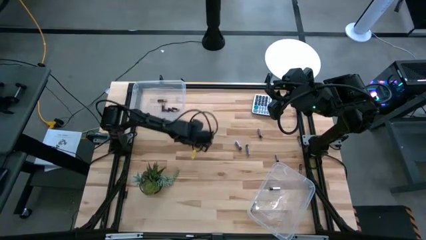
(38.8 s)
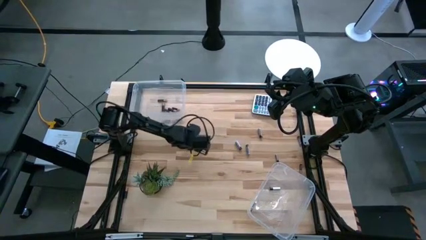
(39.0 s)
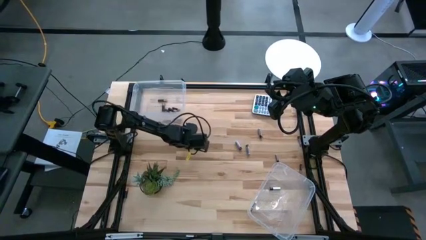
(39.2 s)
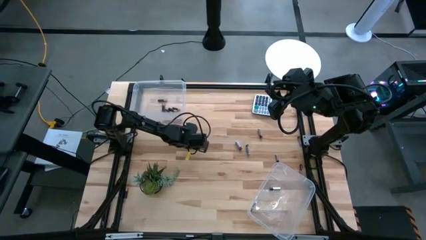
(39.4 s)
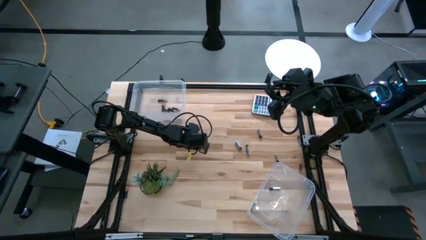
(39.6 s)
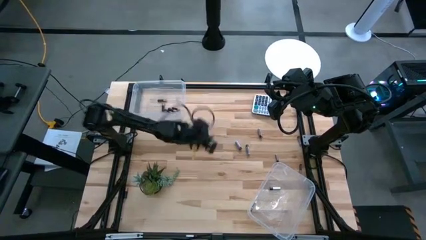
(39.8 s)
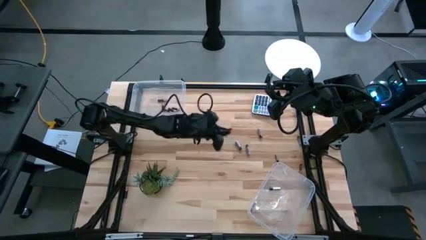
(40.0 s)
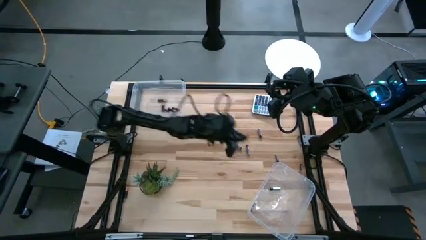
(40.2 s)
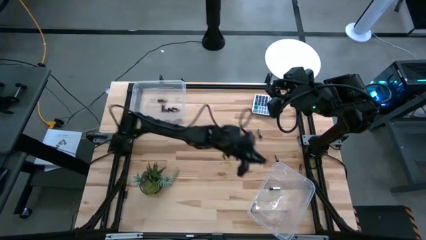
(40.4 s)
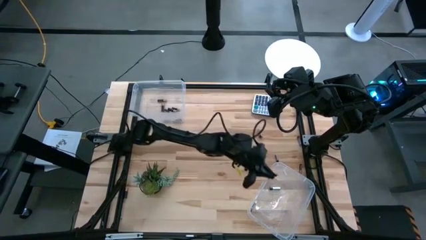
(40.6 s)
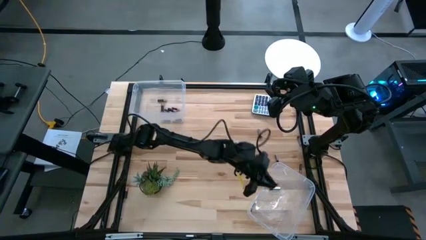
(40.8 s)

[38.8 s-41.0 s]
Task: Sort batteries
Put the silver battery into the bottom transparent bin

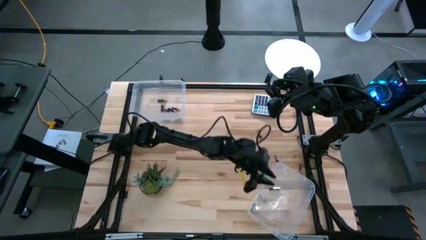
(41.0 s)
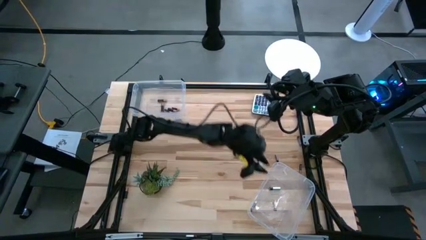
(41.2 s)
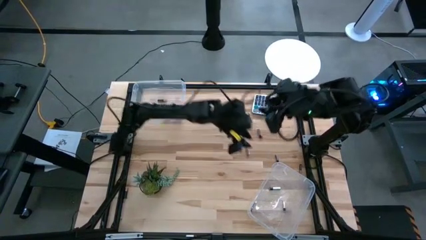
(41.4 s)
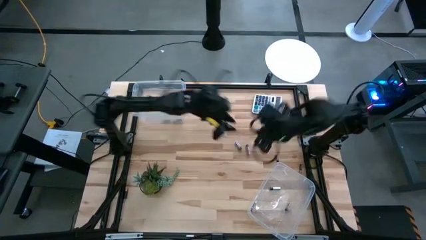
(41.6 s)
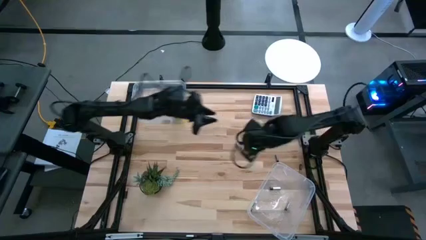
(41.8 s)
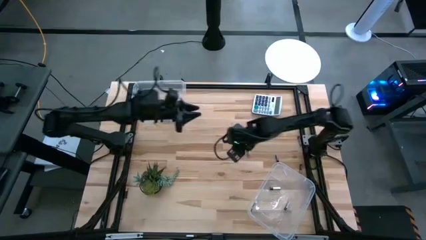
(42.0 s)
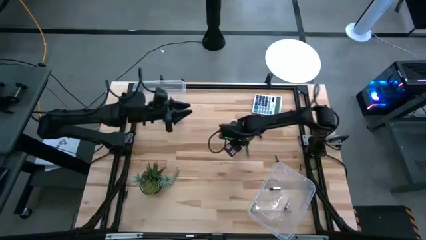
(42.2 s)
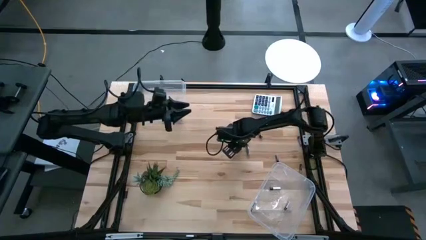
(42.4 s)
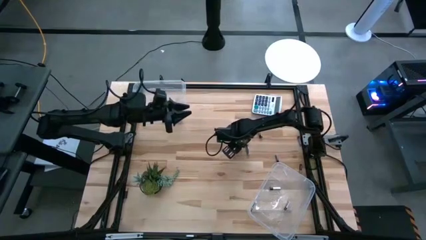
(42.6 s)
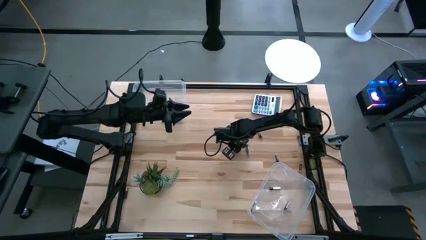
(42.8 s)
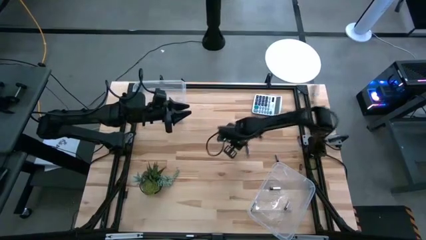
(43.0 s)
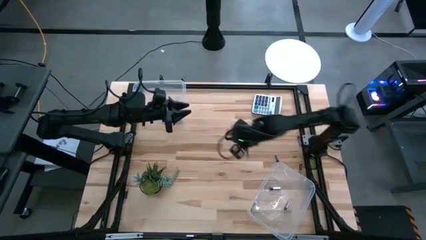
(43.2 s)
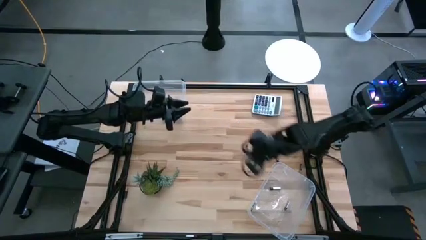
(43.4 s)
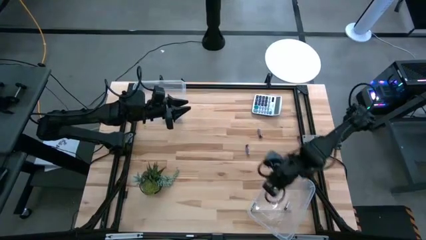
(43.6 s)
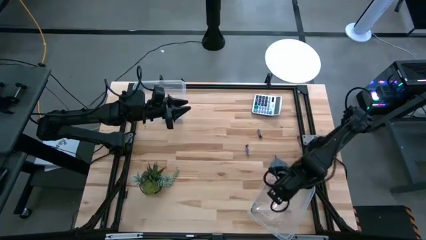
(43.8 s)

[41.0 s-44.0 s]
Put the silver battery into the bottom transparent bin

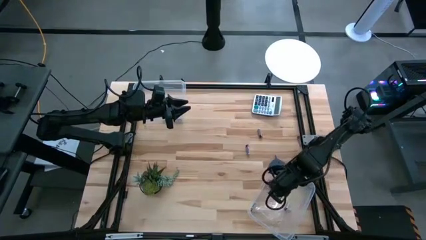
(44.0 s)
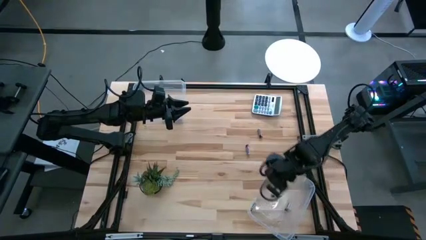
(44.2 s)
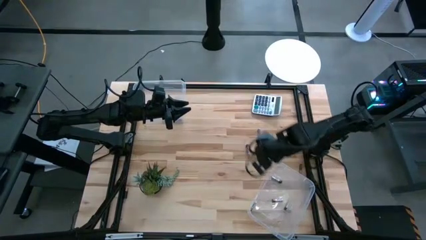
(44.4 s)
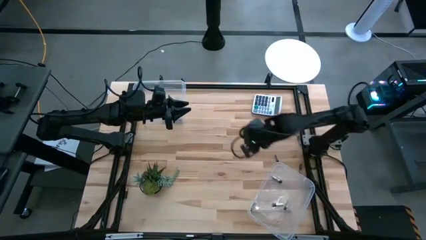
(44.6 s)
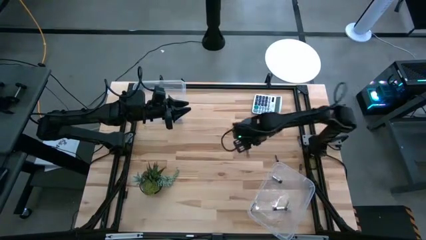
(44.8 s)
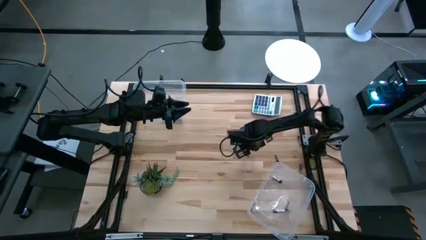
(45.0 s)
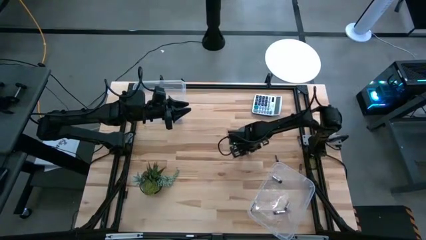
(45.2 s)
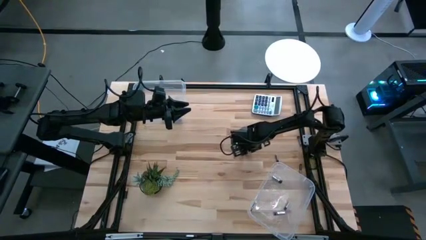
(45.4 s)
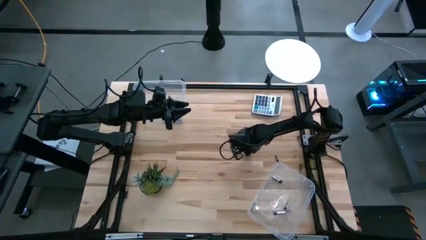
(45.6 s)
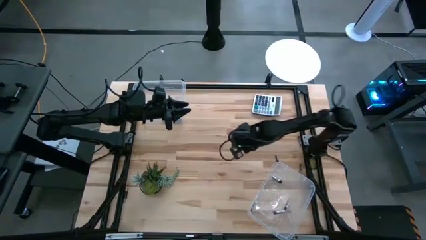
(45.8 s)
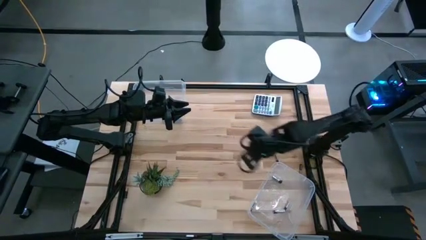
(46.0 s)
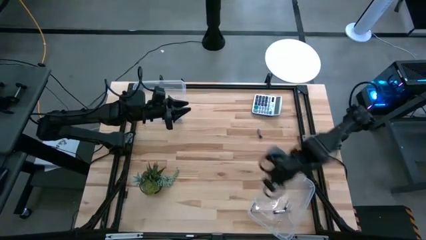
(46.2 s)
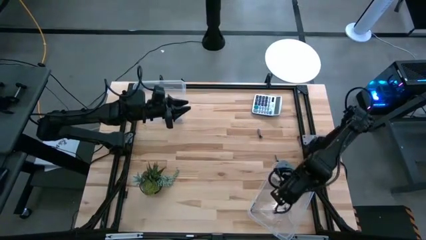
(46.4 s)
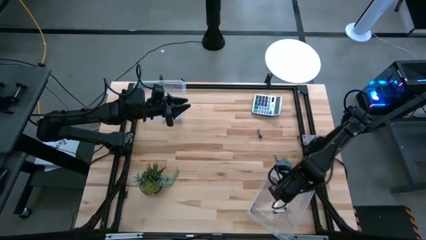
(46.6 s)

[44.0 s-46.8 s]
Put the silver battery into the bottom transparent bin

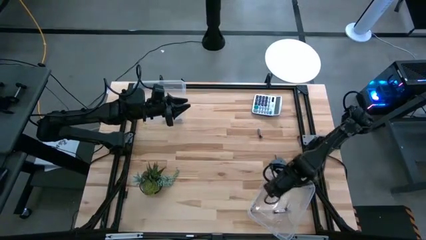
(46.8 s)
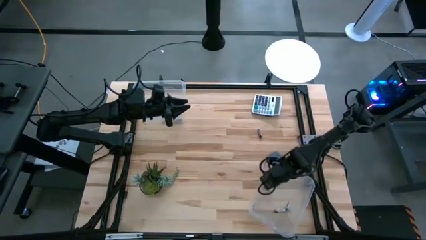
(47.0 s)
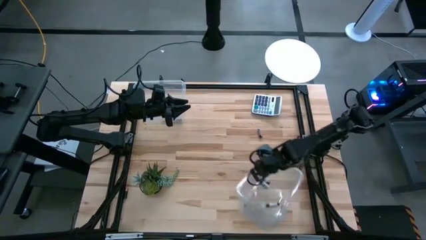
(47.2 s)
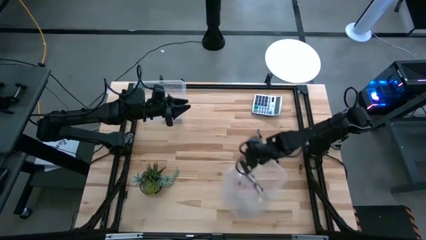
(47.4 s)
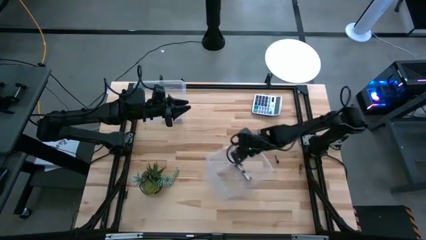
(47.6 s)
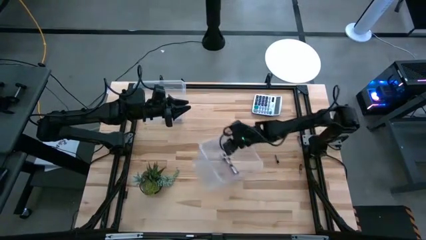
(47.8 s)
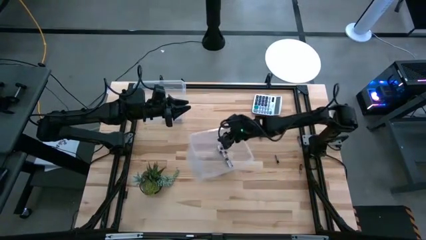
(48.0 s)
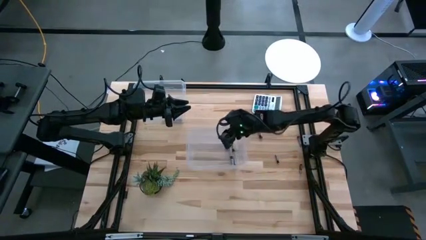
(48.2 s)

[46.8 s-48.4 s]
Move the bottom transparent bin to the center of the table

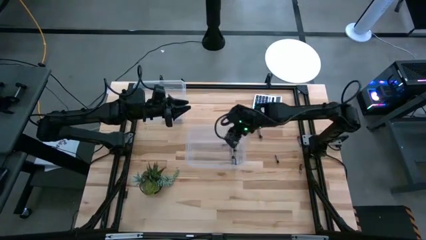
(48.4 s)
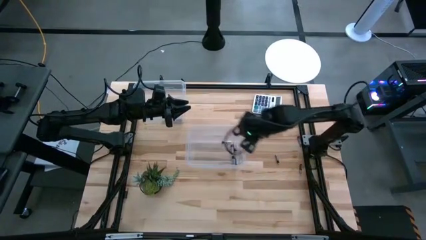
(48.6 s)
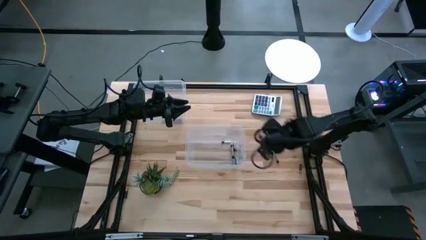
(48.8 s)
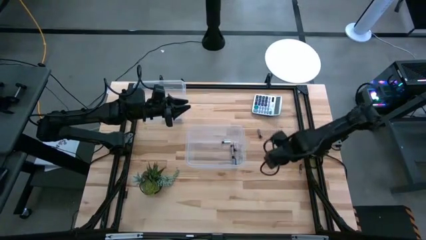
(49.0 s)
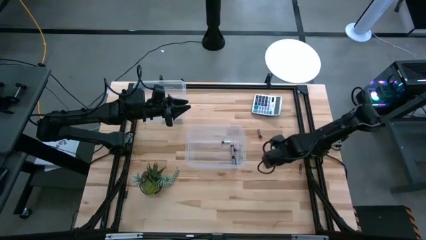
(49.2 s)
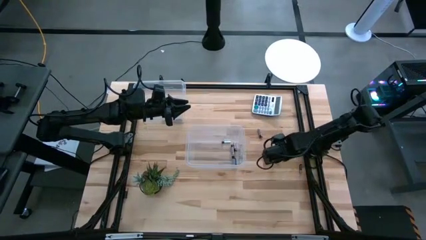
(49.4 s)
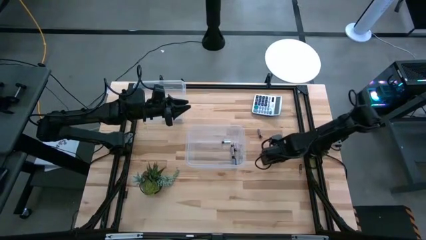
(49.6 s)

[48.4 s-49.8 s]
Put the silver battery into the bottom transparent bin

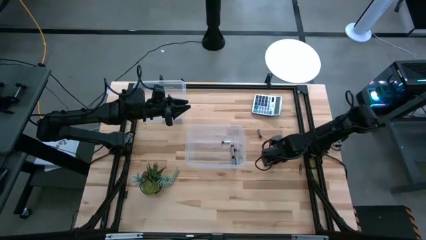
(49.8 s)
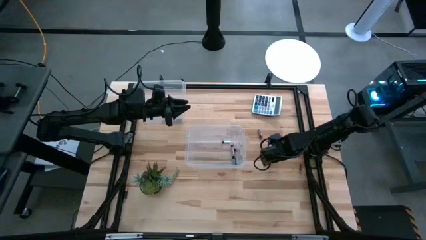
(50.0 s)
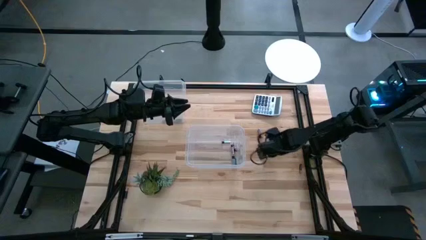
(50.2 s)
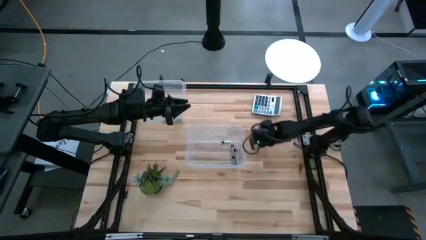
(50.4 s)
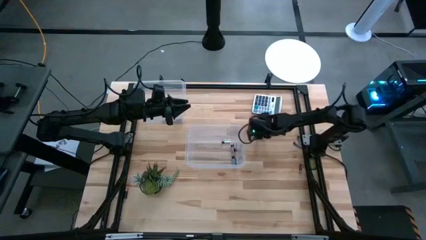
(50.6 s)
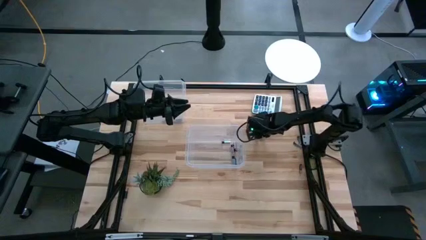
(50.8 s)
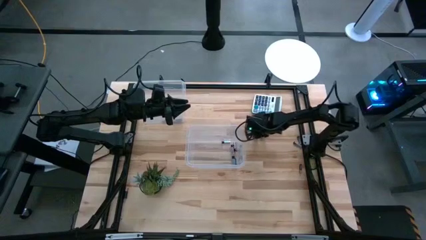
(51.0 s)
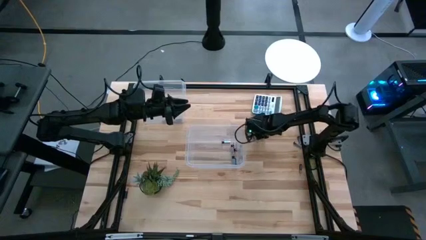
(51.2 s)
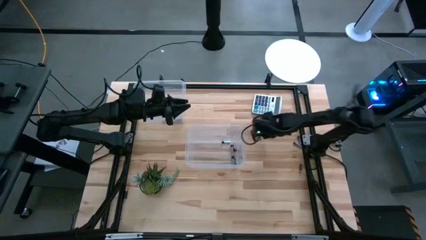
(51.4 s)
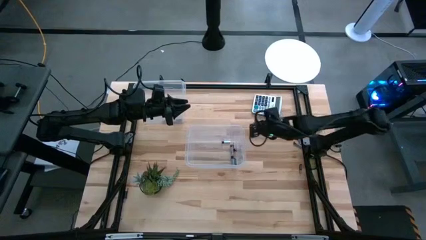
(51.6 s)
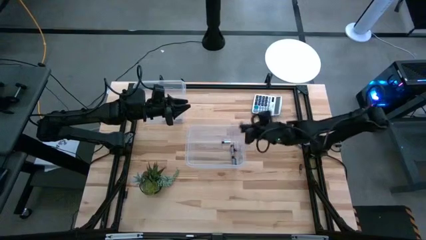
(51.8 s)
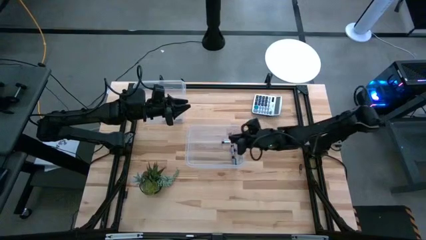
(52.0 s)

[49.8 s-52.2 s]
Put the silver battery into the bottom transparent bin

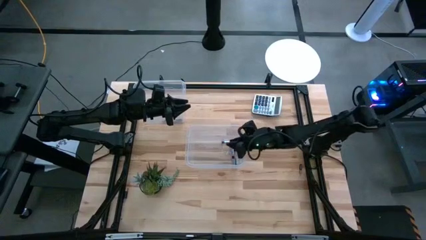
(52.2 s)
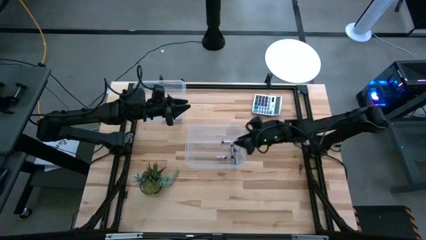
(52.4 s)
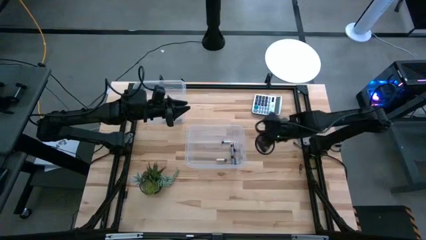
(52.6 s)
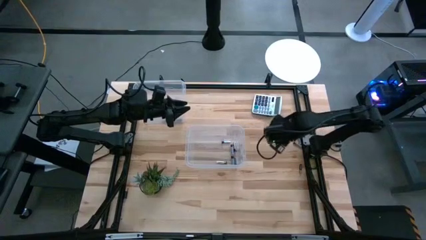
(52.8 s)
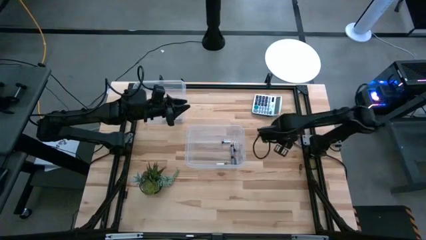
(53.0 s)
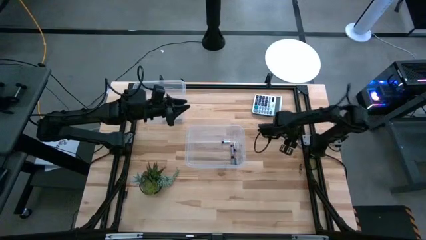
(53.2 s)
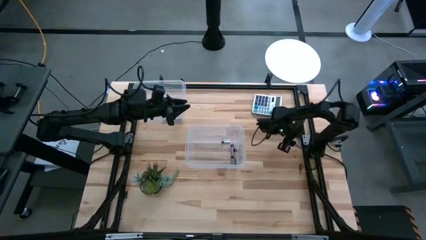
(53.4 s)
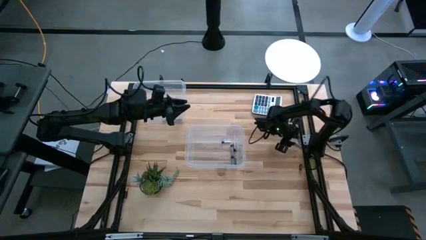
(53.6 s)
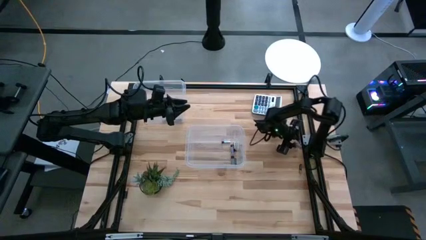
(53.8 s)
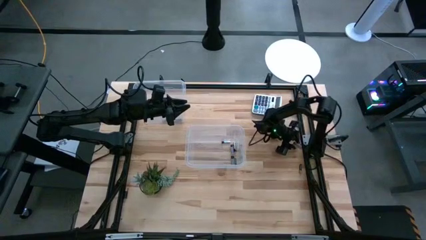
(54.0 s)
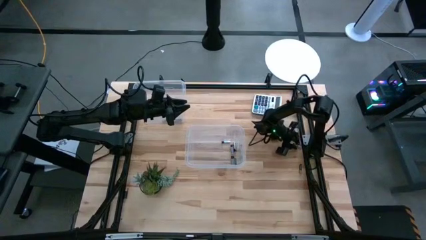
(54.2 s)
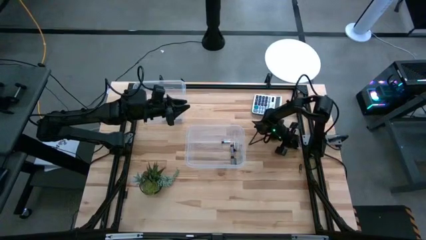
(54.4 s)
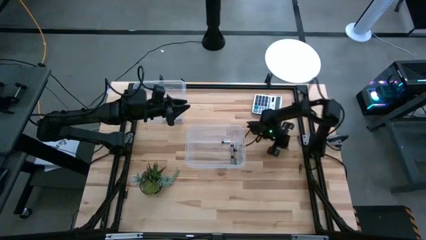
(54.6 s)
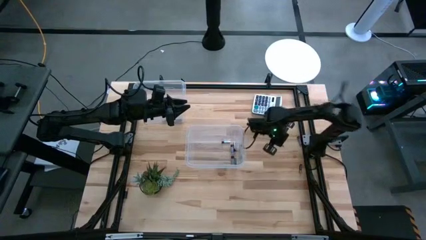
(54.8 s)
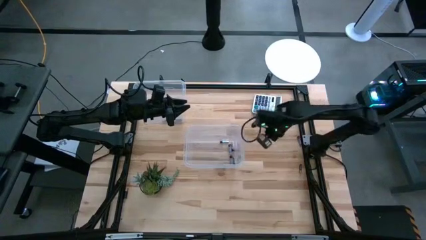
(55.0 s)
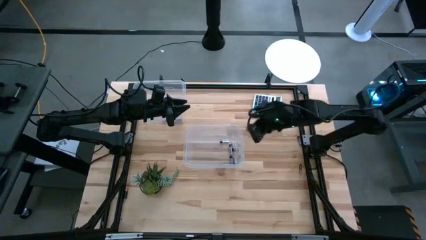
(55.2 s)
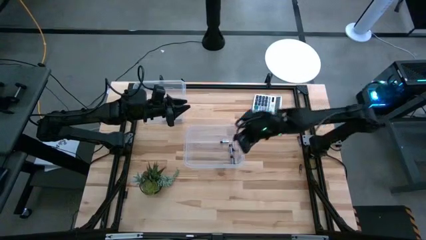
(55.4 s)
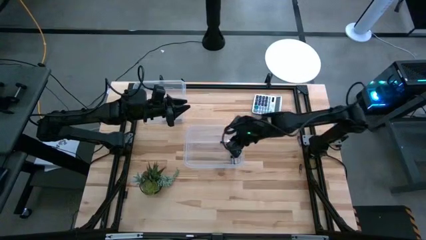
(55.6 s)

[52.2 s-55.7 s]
Put the silver battery into the bottom transparent bin
